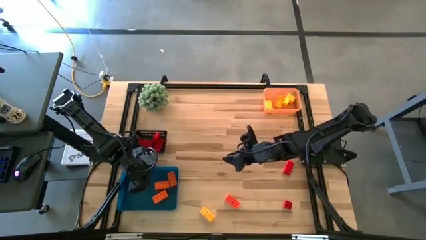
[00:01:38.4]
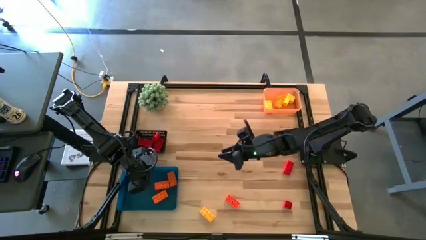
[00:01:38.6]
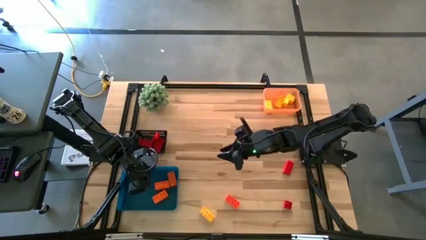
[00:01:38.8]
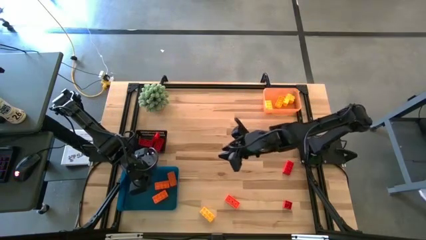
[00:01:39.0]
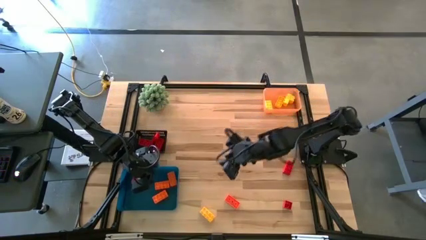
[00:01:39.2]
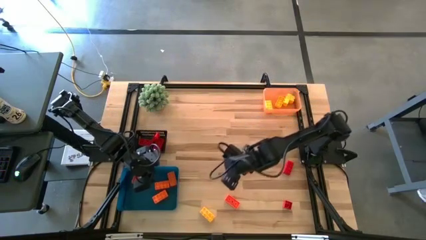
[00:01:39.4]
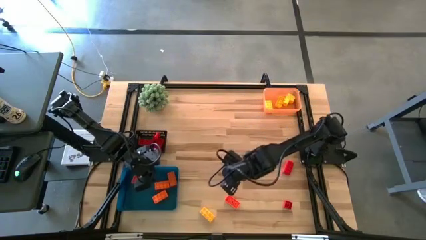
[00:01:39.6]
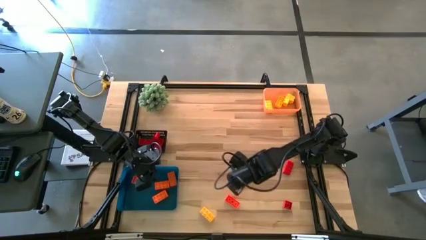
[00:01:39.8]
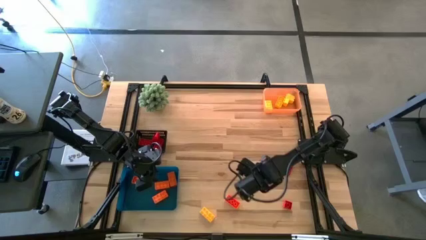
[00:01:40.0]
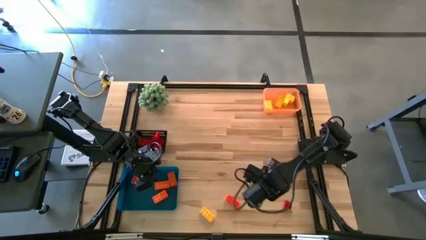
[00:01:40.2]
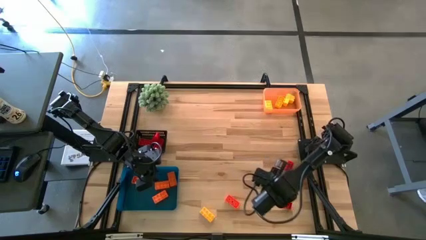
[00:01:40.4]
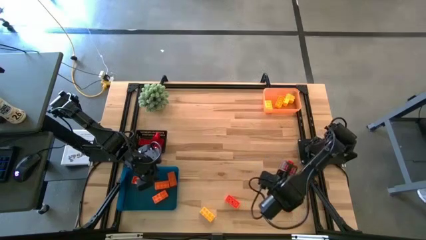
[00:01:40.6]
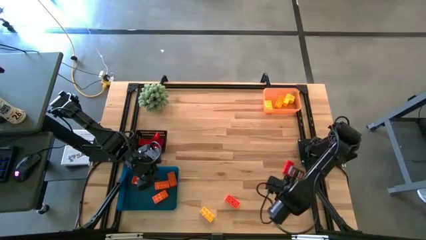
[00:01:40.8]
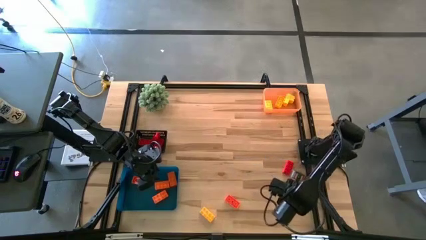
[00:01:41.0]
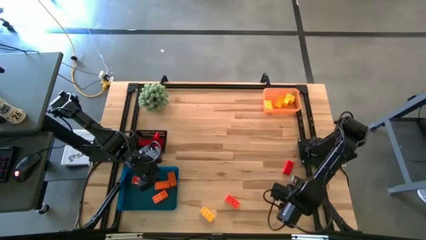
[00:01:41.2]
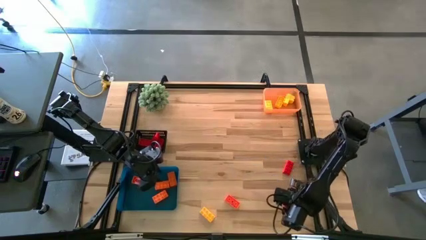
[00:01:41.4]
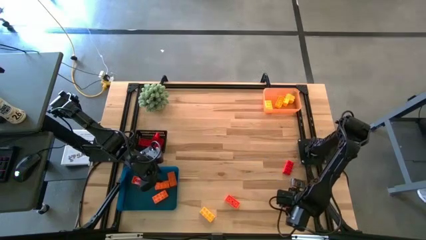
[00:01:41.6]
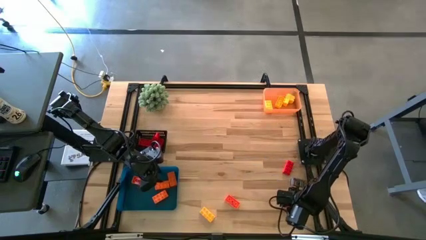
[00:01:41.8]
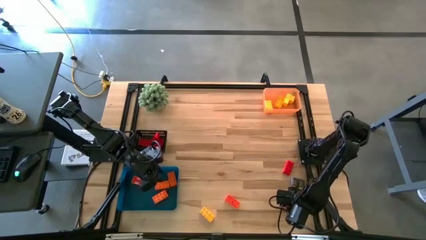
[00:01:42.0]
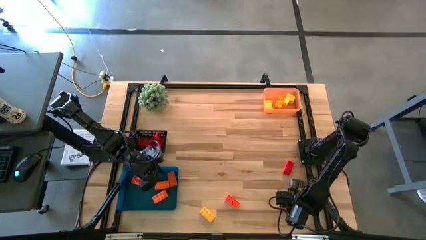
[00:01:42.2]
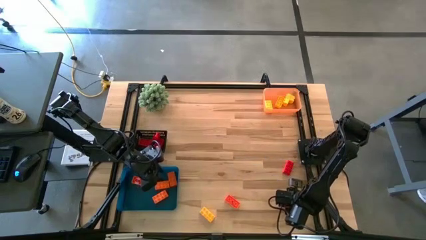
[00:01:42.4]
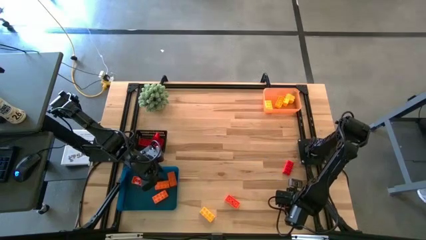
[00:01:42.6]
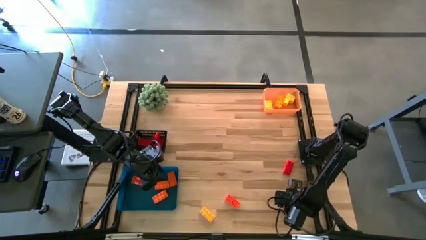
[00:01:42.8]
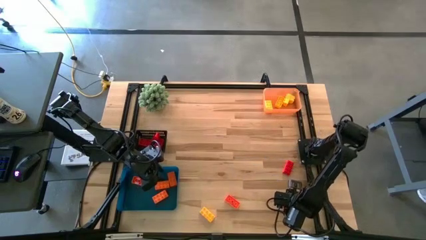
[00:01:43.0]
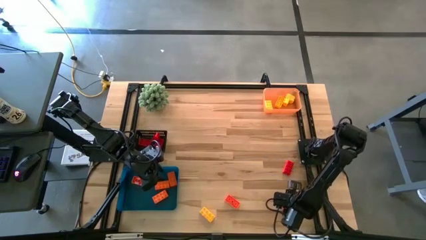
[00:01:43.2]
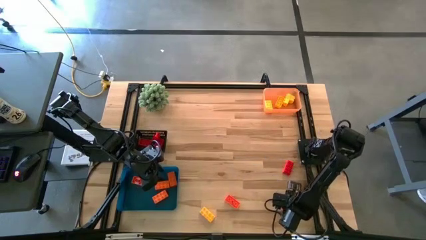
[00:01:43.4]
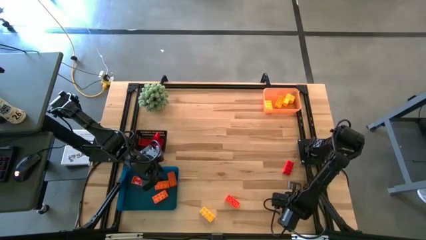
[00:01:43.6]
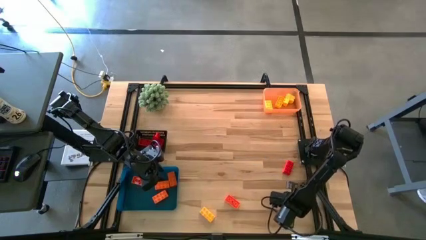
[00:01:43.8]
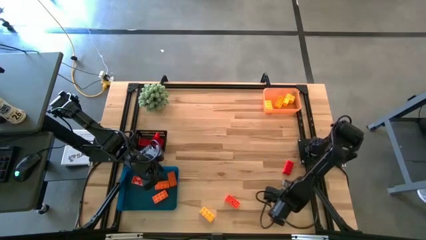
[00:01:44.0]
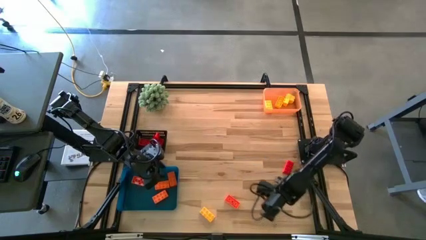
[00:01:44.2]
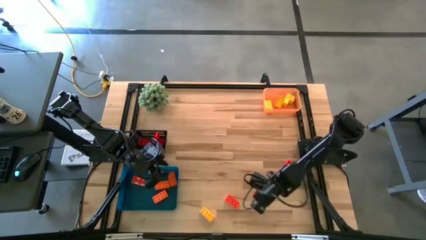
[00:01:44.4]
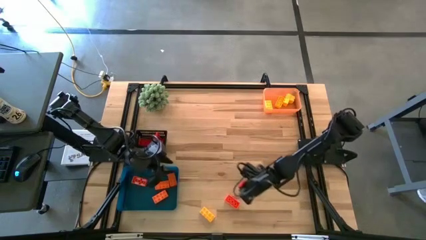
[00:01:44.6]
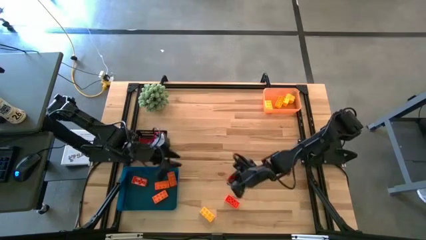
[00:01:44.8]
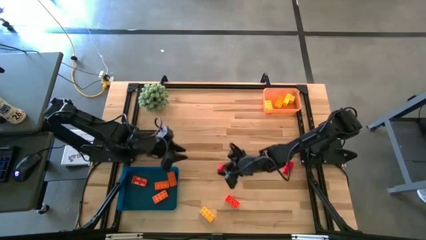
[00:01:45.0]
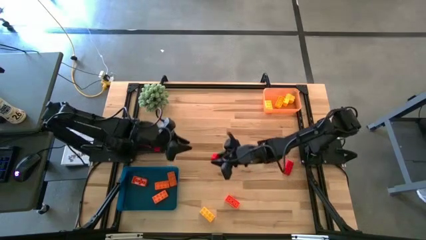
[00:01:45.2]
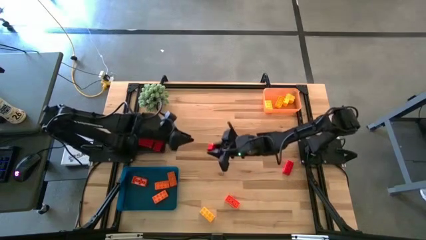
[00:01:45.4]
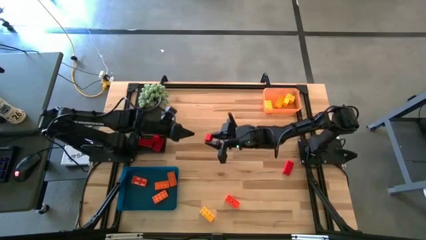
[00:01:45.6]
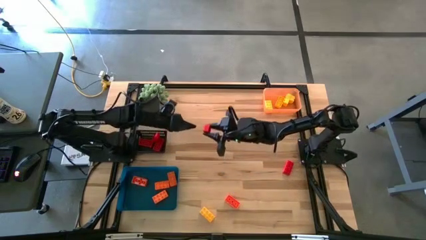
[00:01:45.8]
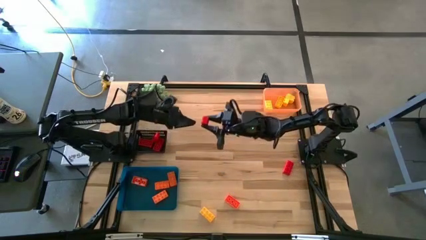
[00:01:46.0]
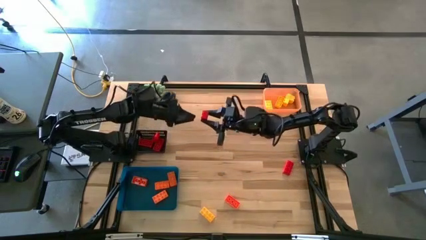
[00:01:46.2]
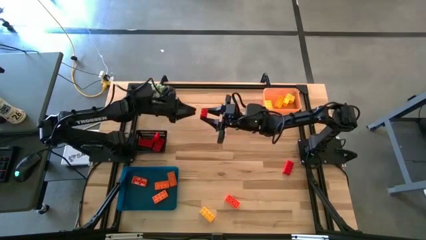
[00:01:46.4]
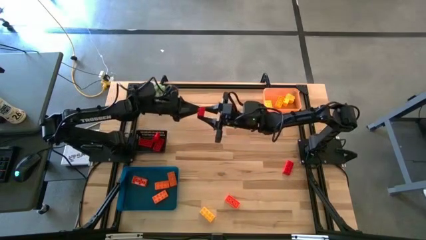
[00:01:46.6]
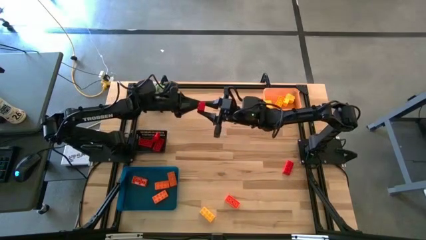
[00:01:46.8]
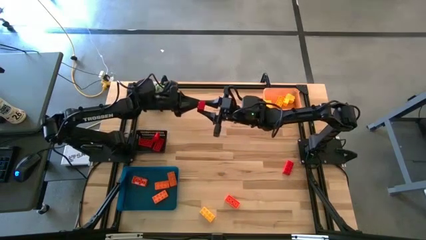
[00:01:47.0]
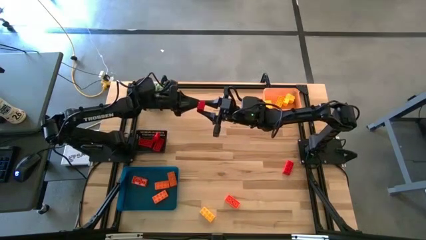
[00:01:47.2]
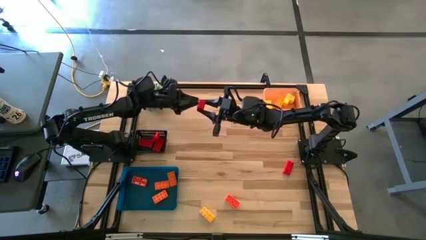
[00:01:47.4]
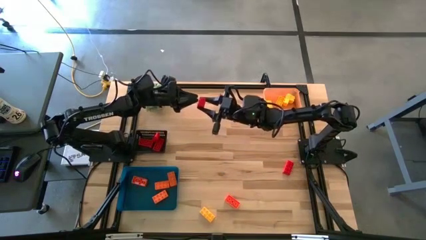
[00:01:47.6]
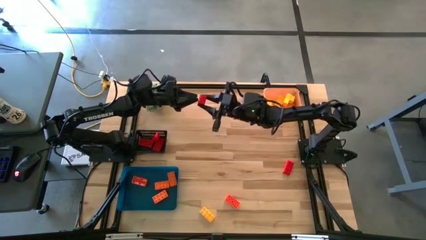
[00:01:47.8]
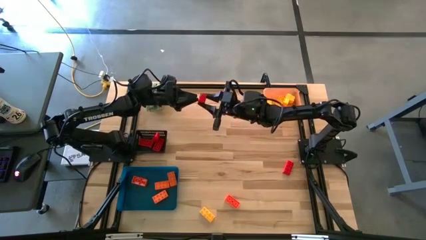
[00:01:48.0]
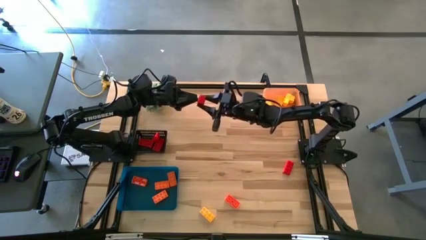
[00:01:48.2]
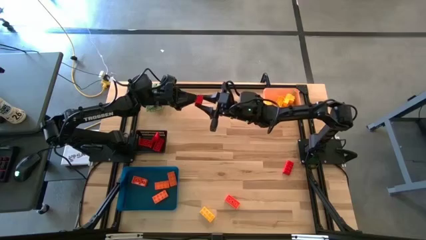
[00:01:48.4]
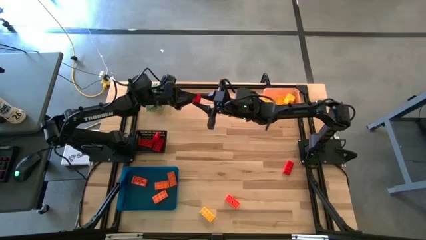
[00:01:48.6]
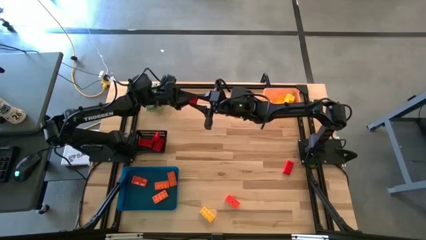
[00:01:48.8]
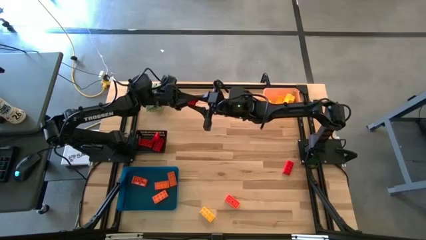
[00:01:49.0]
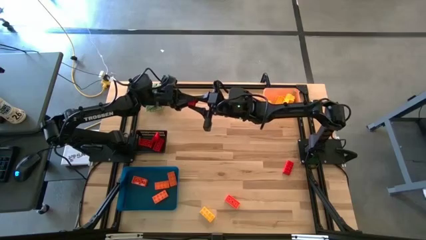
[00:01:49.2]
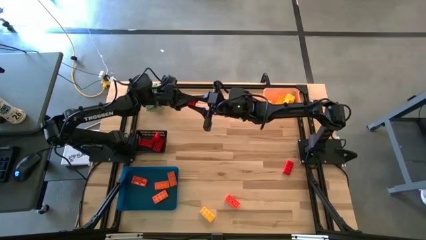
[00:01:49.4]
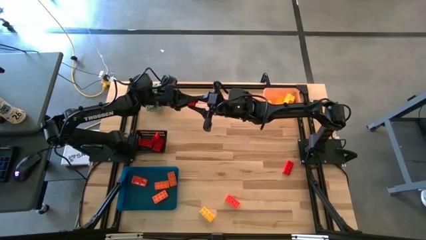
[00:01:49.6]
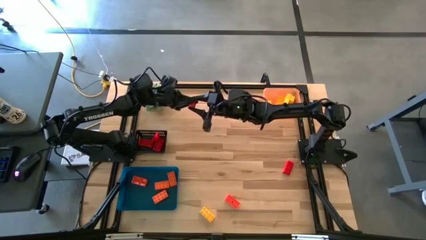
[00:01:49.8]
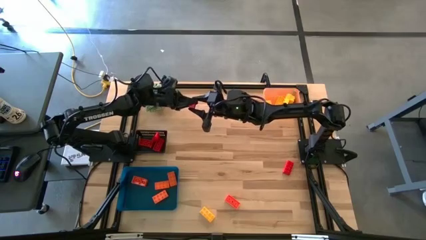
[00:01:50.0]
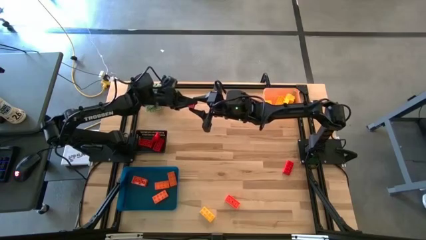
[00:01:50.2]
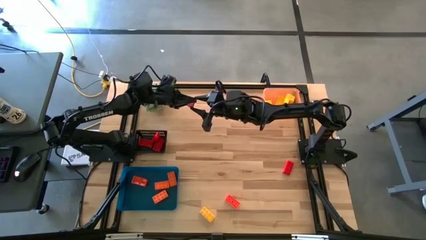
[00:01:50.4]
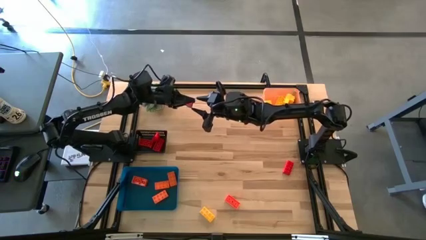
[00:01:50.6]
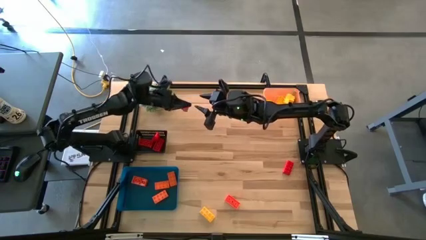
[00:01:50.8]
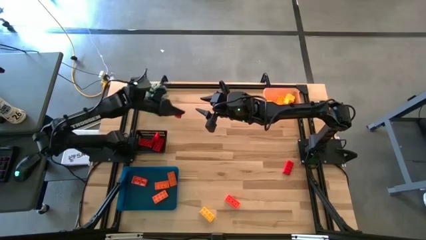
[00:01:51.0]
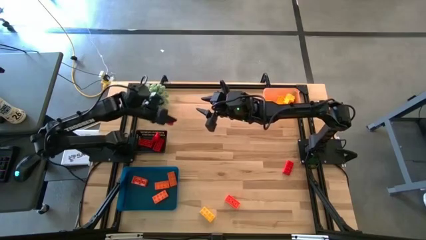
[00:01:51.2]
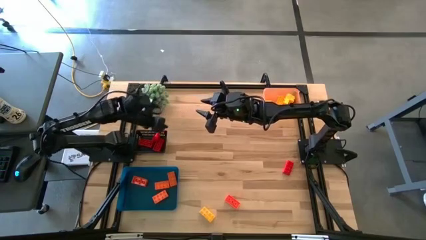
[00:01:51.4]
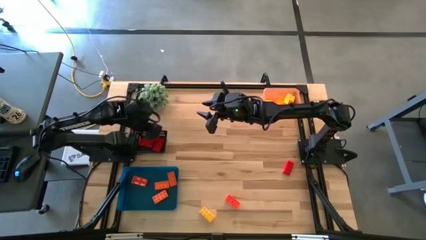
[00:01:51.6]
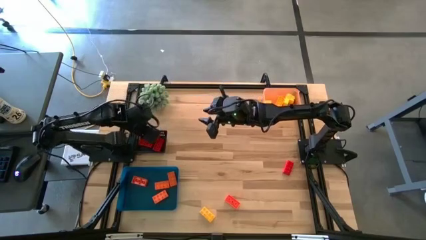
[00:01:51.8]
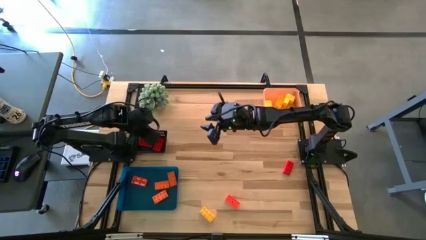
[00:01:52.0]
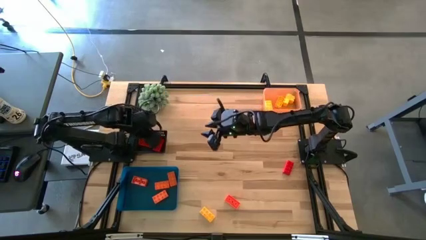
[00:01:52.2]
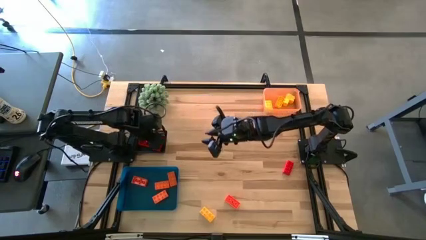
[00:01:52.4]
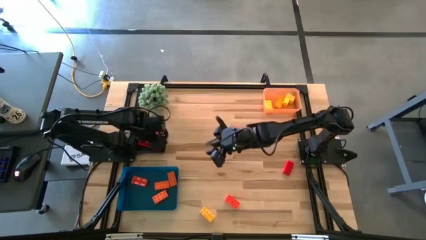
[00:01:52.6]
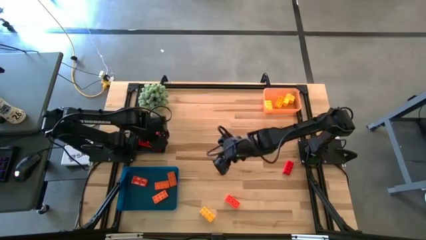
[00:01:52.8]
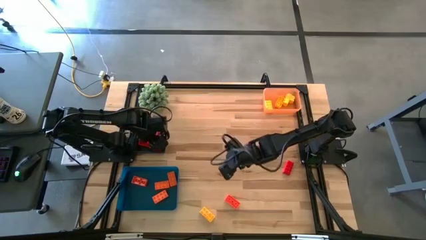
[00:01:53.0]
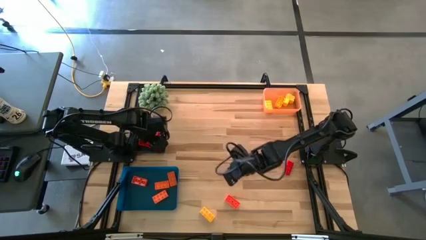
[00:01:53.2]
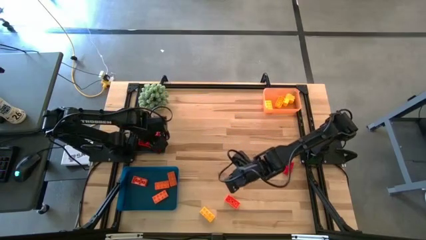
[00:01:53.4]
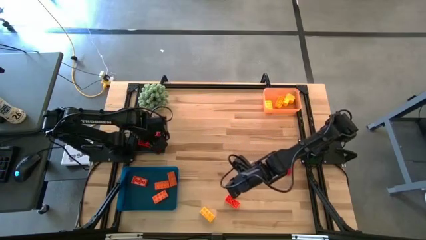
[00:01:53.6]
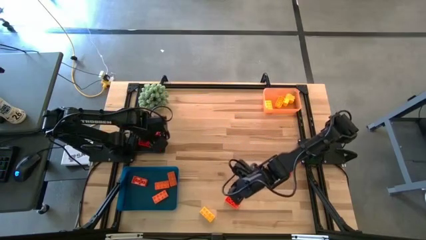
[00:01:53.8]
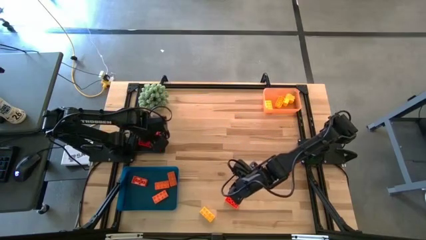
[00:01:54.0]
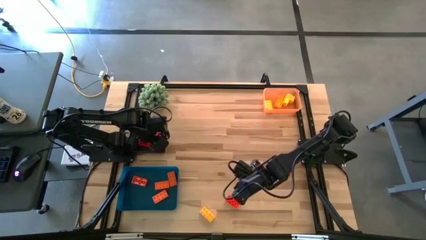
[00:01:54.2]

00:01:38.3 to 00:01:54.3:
Task: Sort & place blocks by color
Put the red game piece into the black bin
